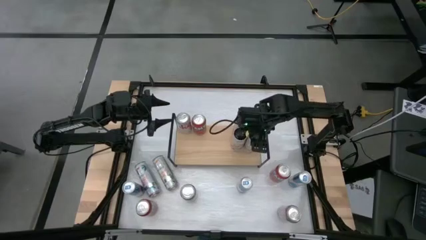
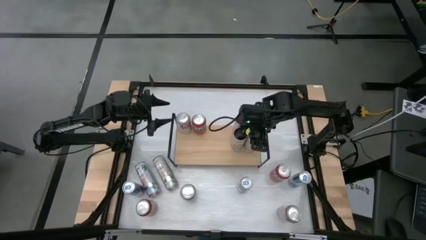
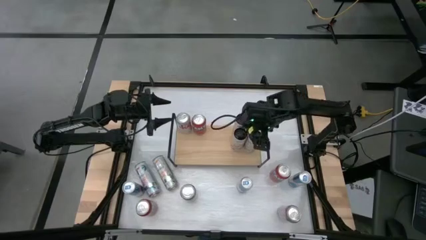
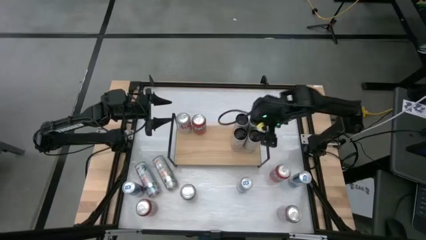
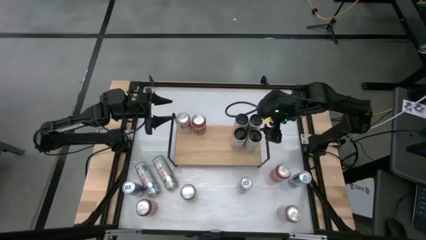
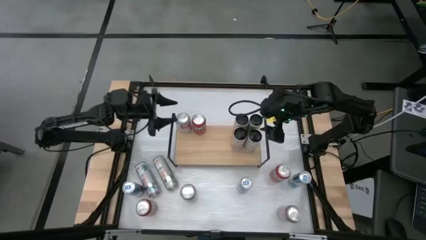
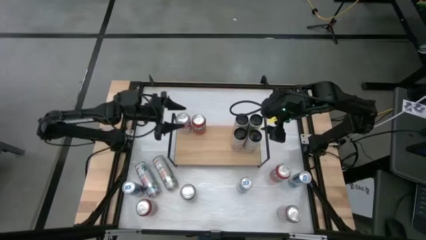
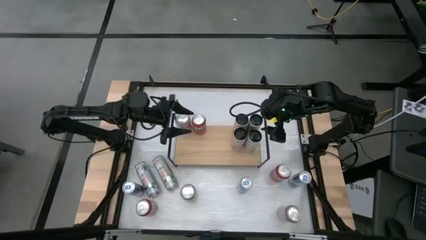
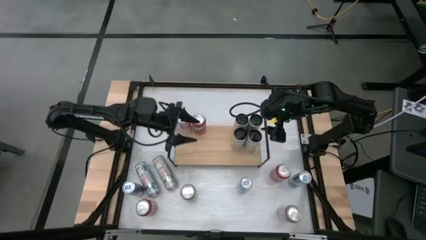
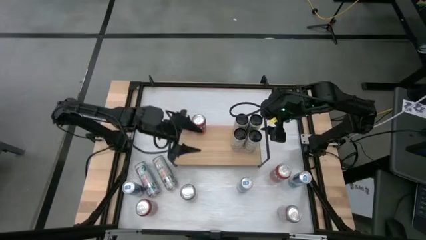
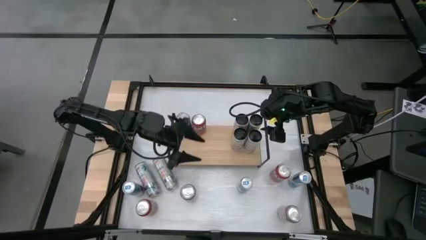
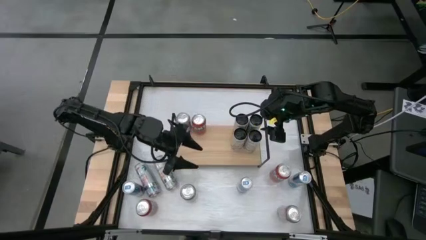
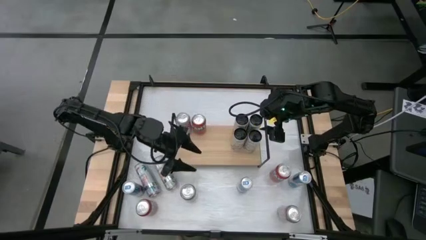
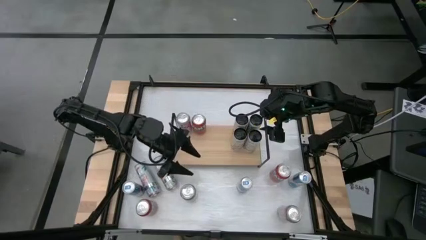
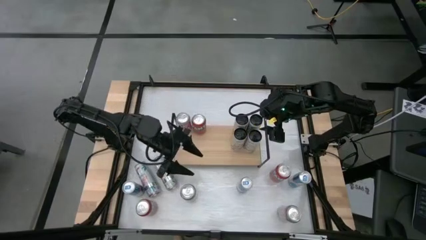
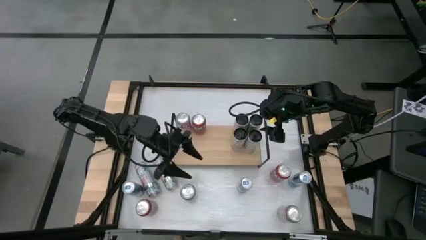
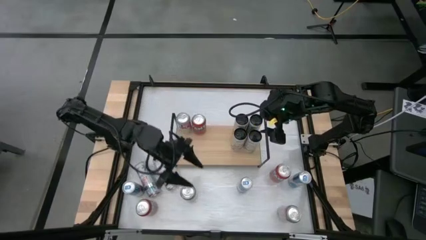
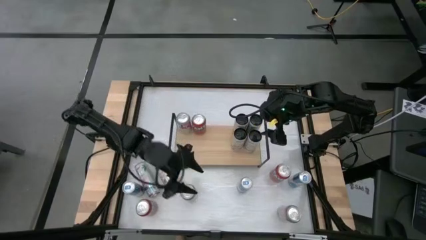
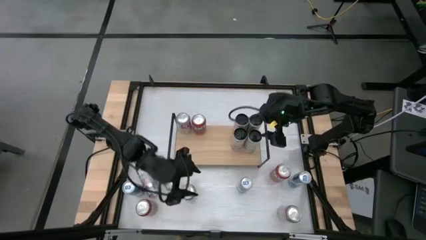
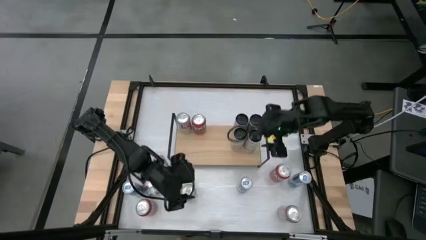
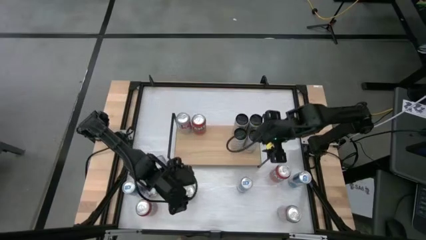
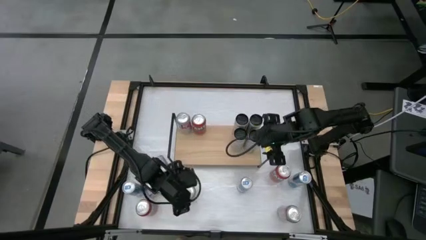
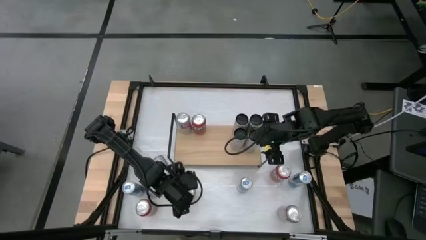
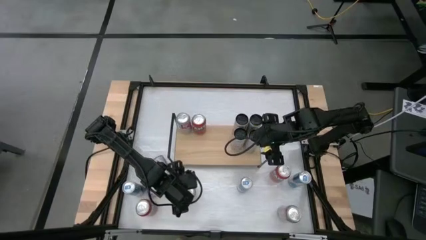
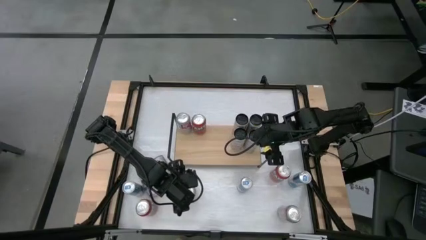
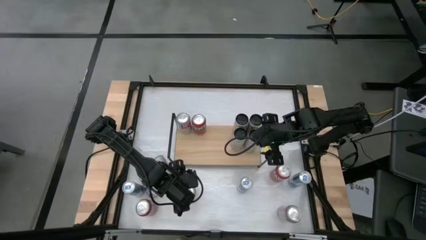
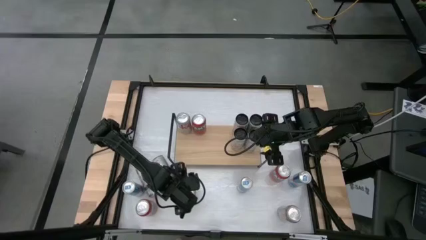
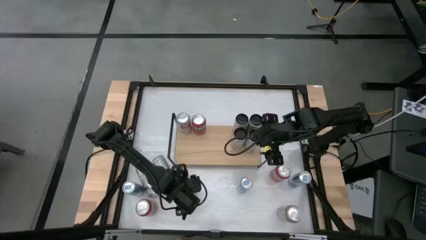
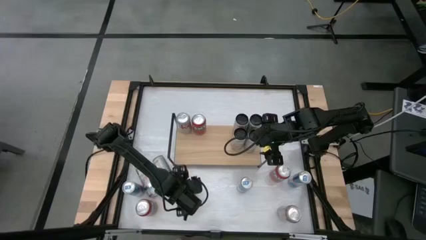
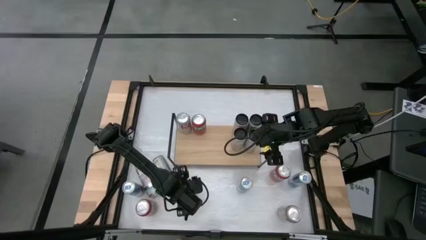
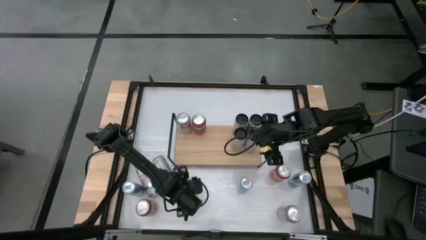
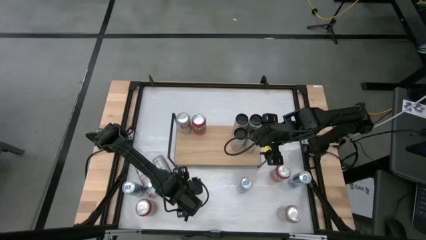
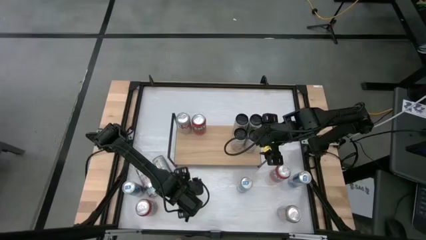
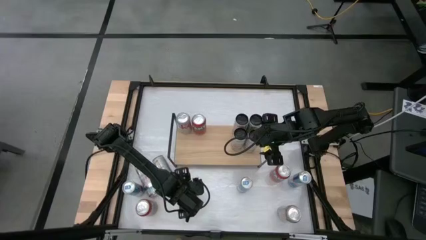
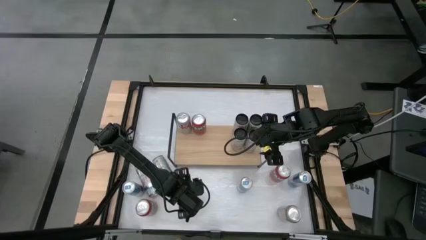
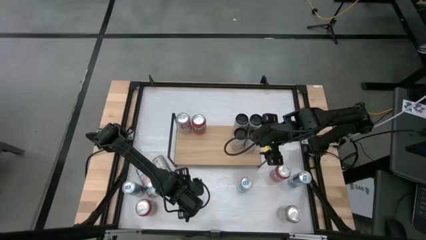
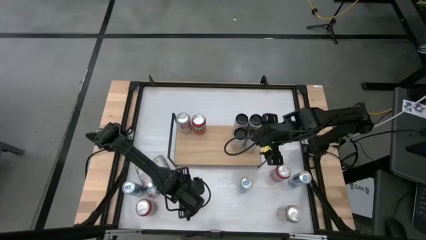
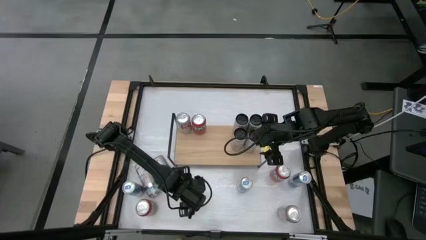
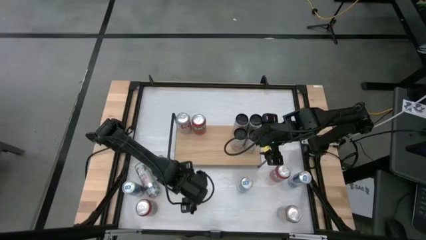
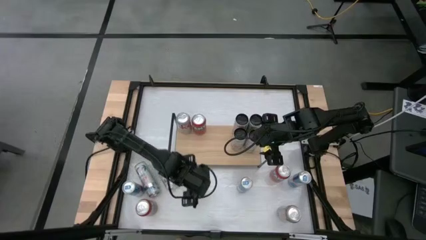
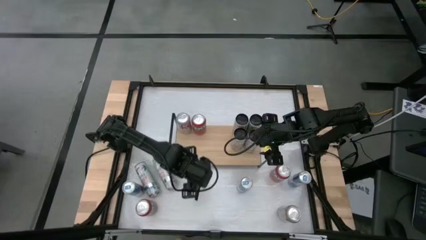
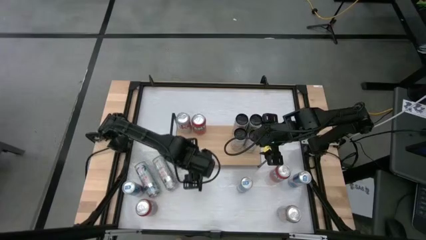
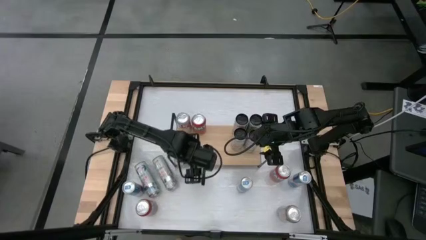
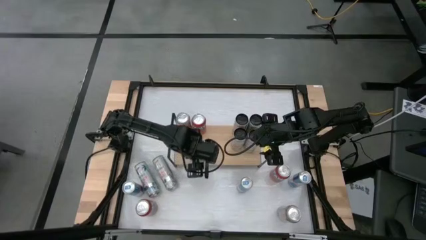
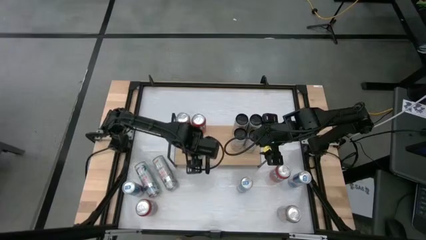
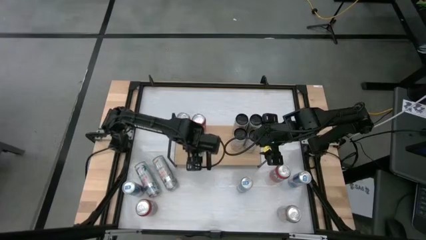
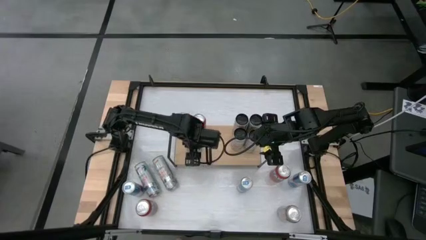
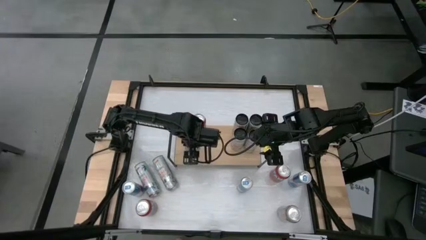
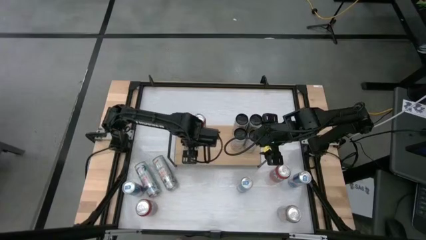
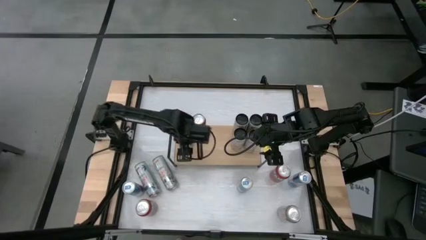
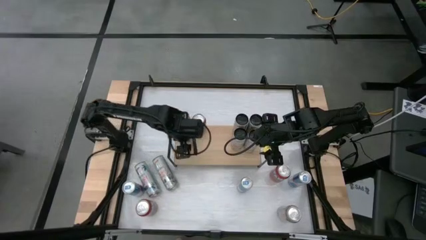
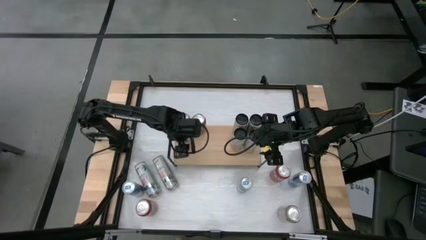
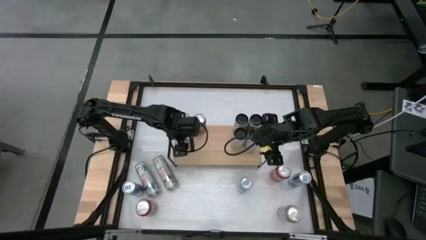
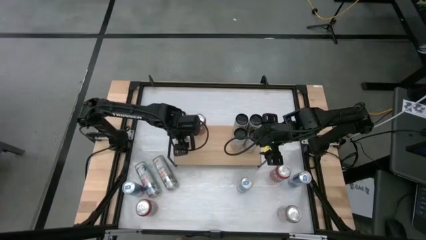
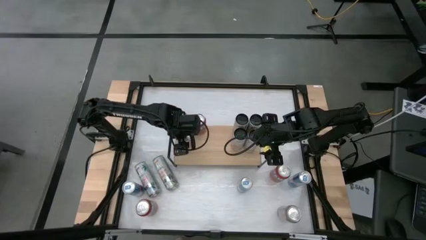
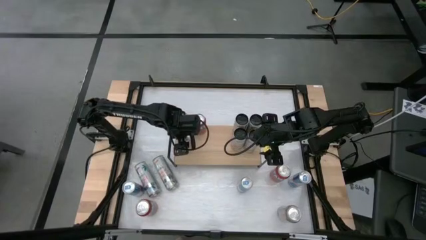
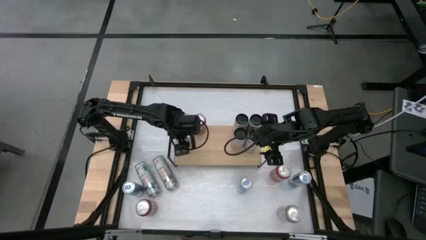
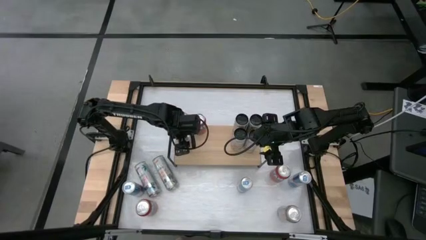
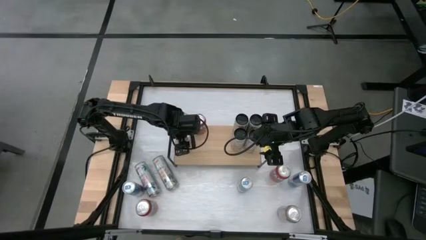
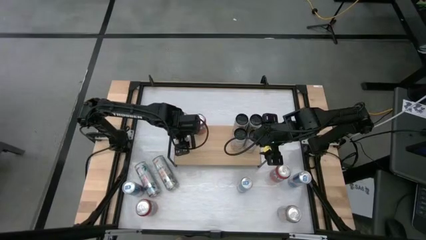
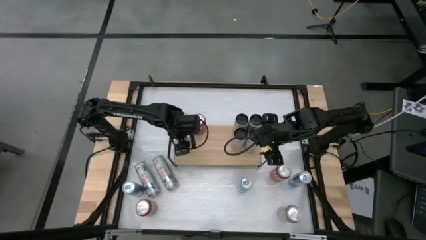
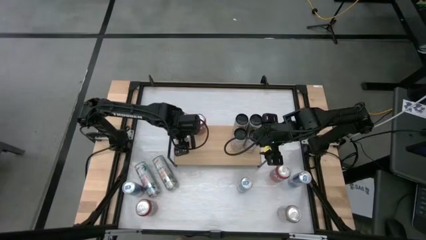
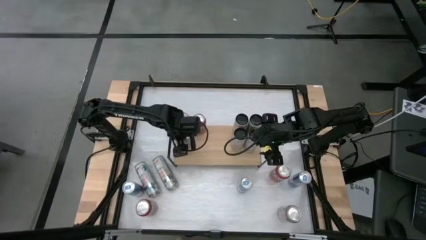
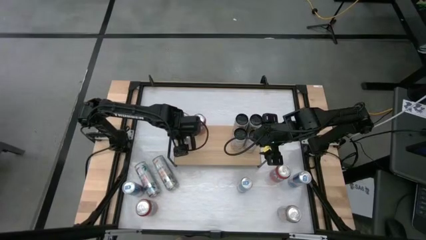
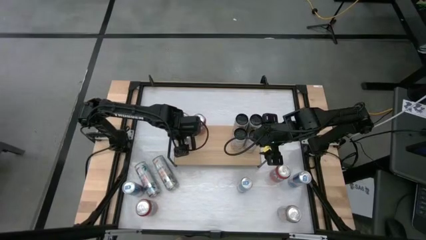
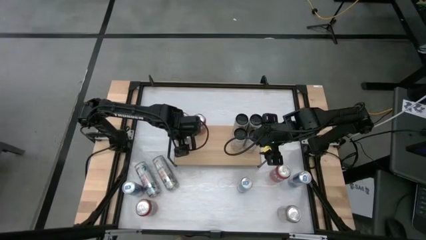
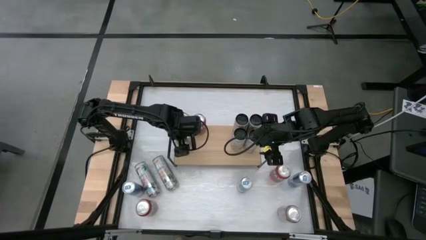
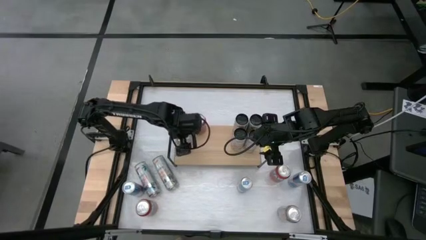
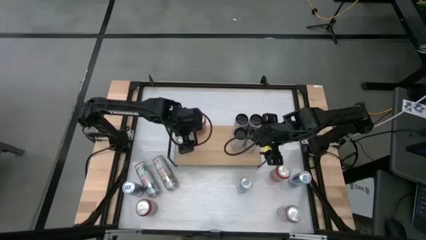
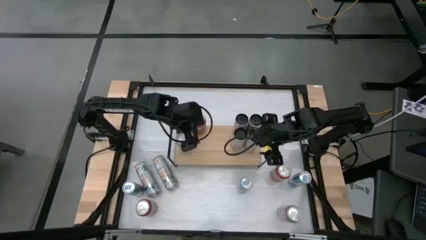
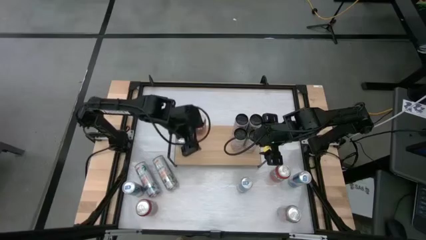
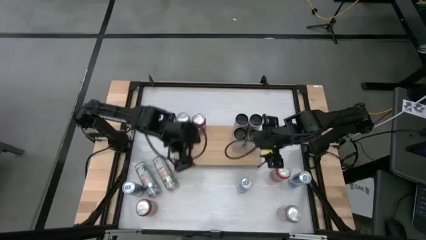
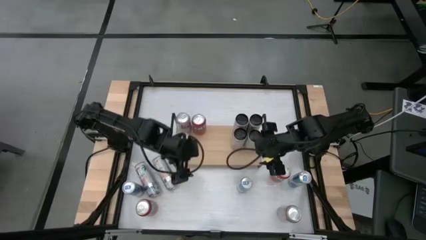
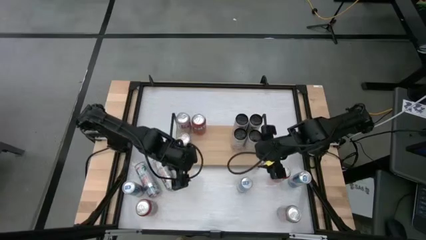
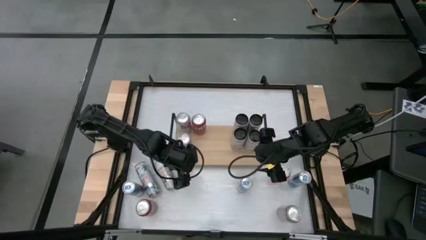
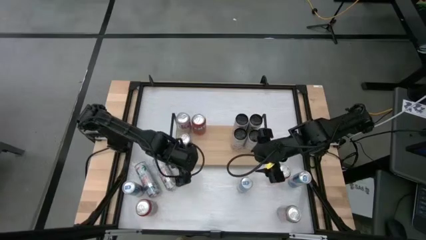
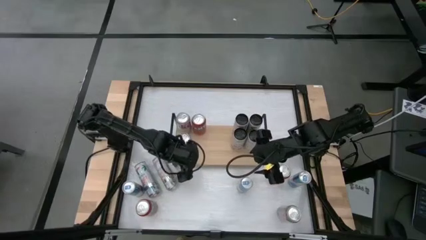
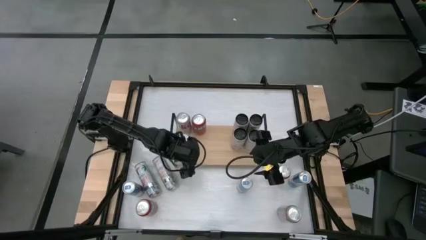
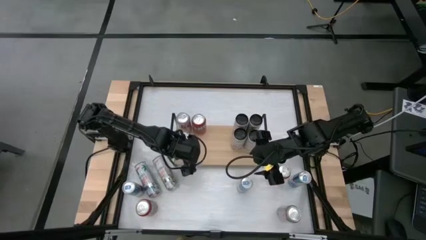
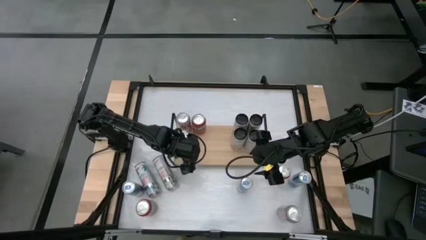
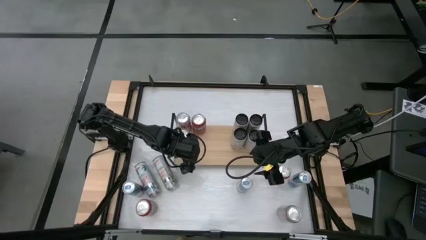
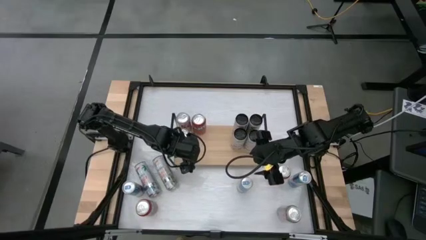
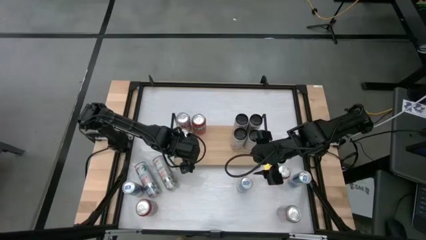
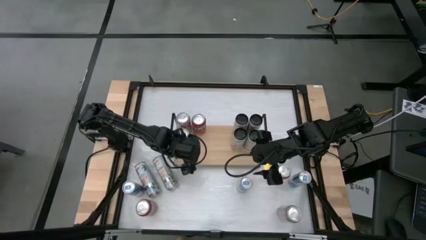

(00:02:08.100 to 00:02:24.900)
Task: Place canned beverage on shelf
Put the left silver-red soda can on the shelf aligned with the other silver-red soda can
